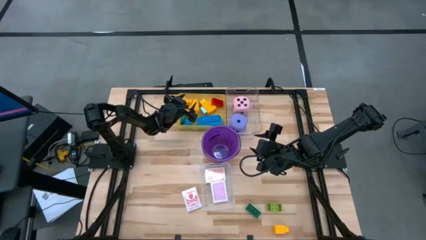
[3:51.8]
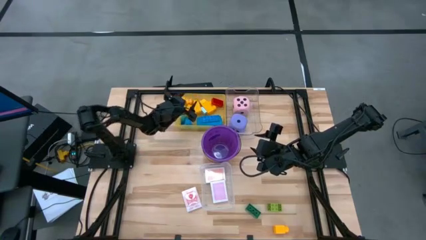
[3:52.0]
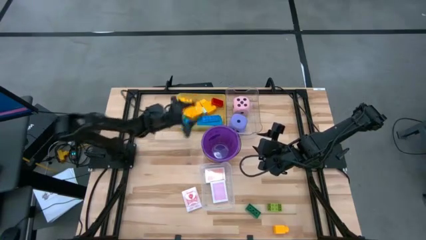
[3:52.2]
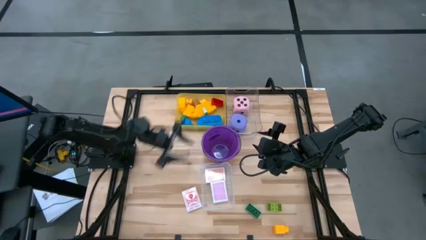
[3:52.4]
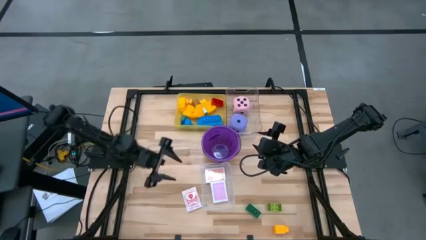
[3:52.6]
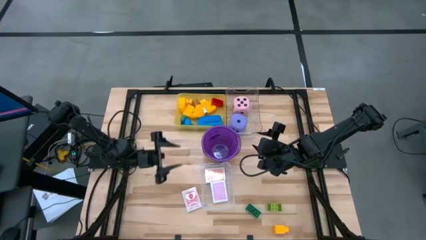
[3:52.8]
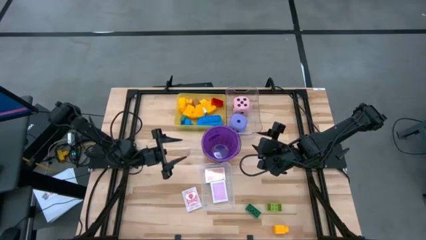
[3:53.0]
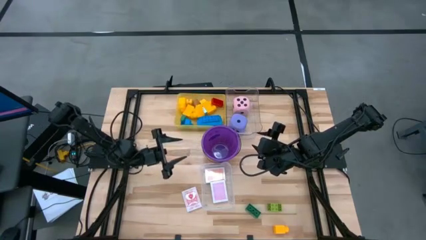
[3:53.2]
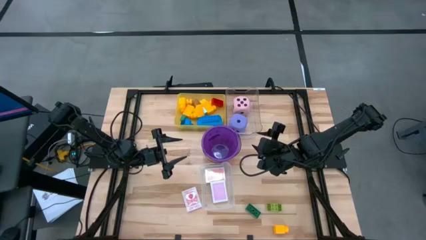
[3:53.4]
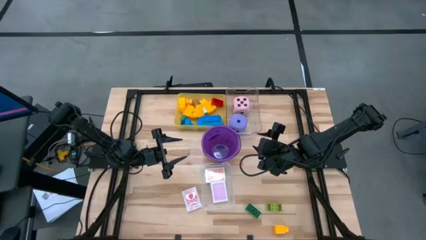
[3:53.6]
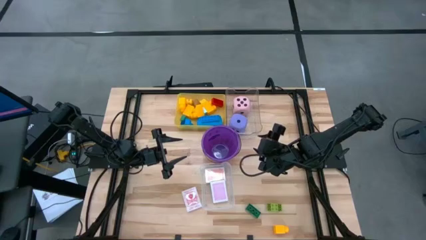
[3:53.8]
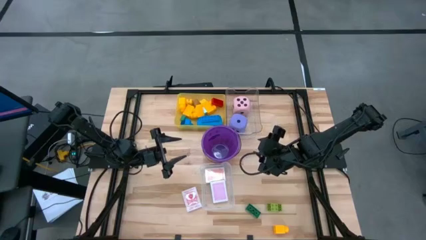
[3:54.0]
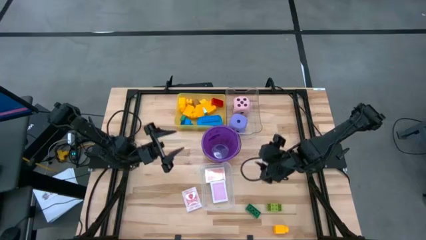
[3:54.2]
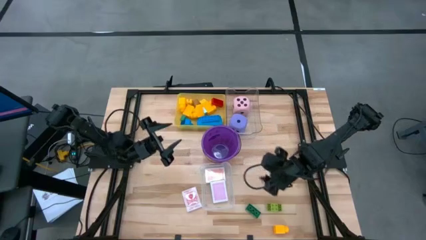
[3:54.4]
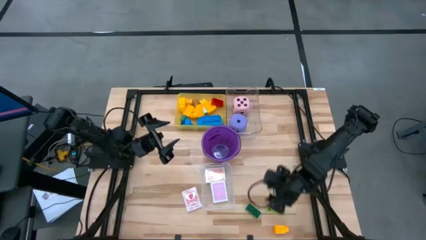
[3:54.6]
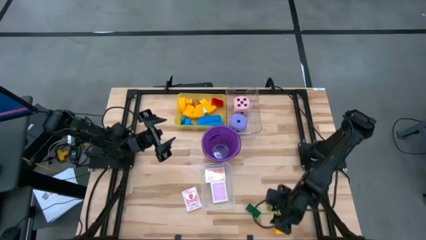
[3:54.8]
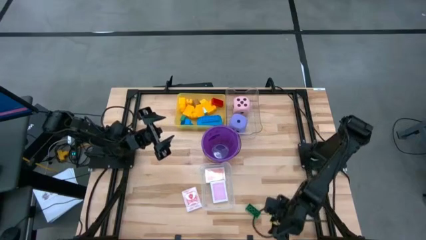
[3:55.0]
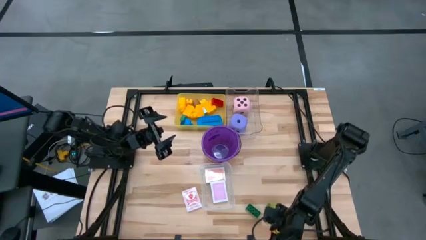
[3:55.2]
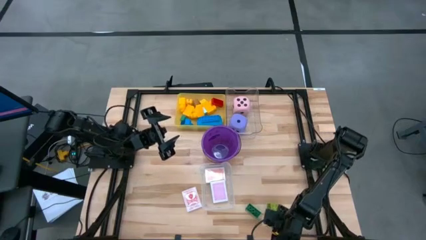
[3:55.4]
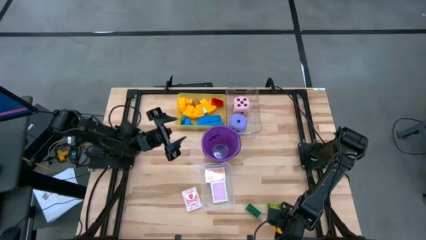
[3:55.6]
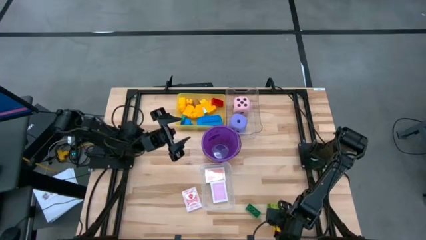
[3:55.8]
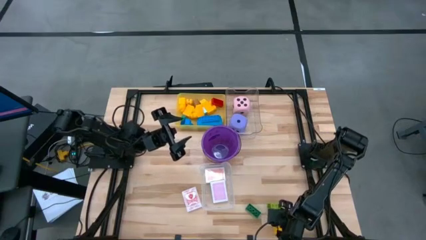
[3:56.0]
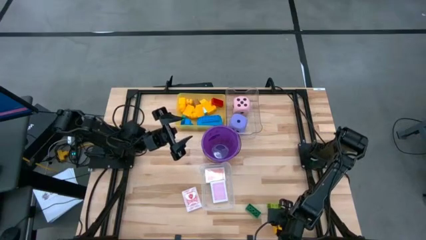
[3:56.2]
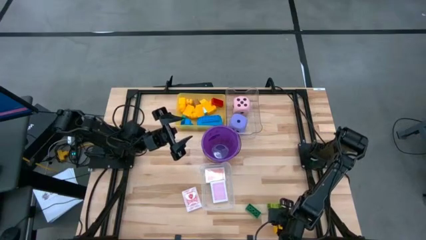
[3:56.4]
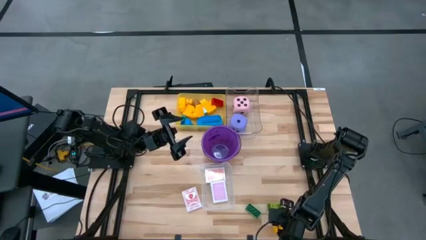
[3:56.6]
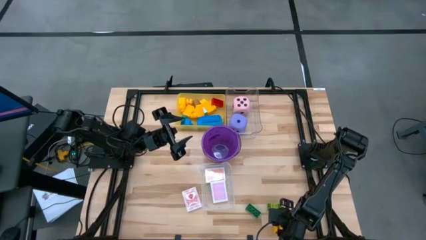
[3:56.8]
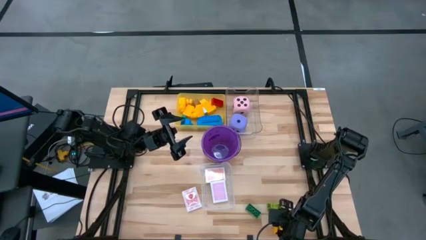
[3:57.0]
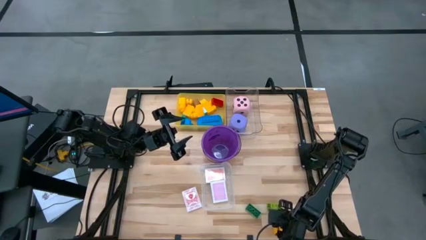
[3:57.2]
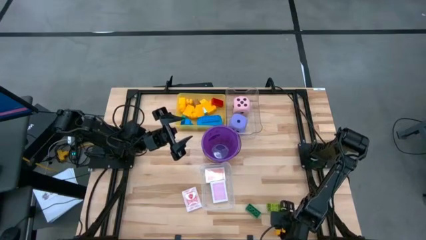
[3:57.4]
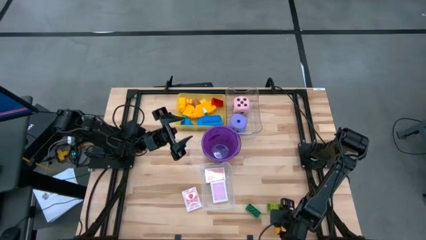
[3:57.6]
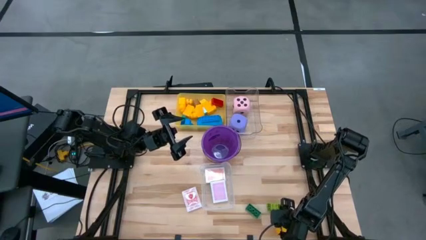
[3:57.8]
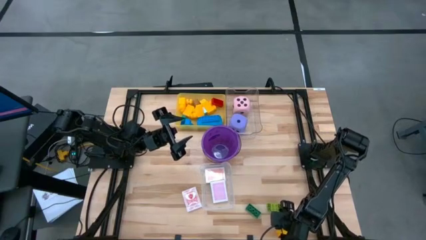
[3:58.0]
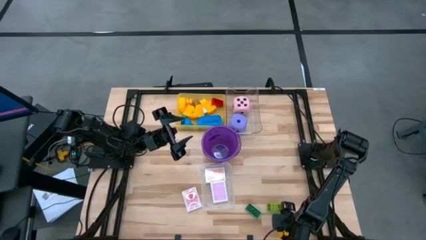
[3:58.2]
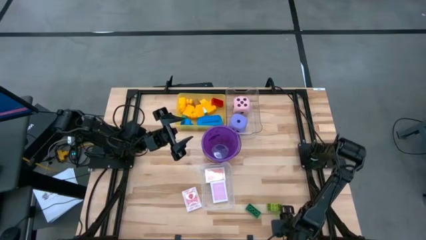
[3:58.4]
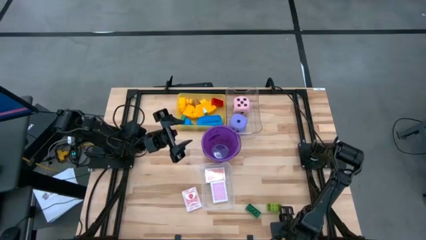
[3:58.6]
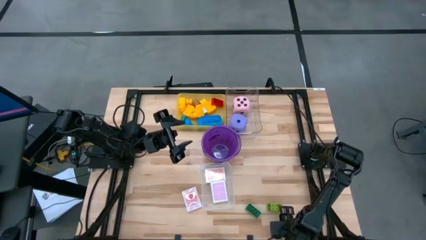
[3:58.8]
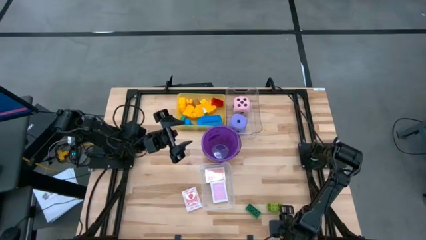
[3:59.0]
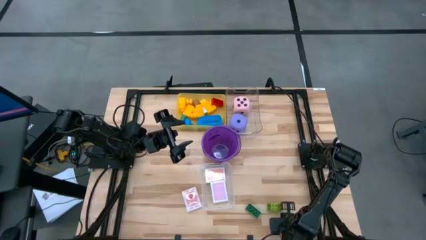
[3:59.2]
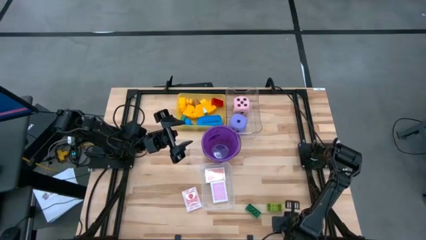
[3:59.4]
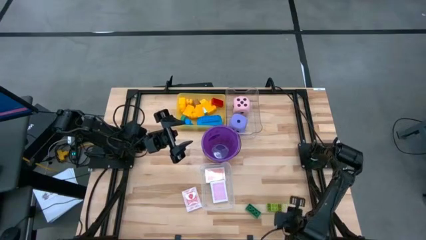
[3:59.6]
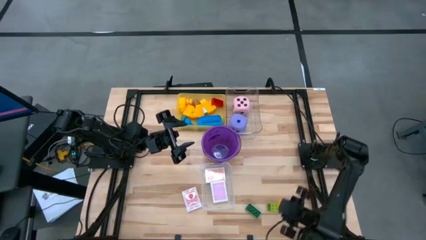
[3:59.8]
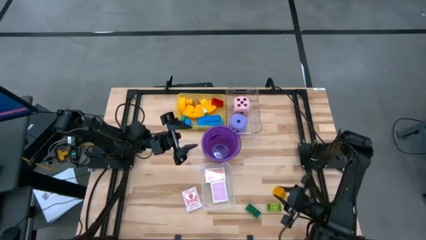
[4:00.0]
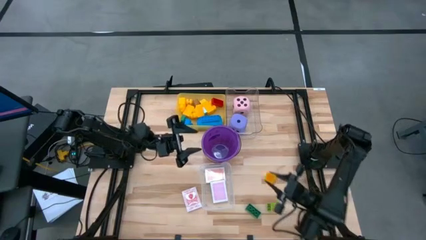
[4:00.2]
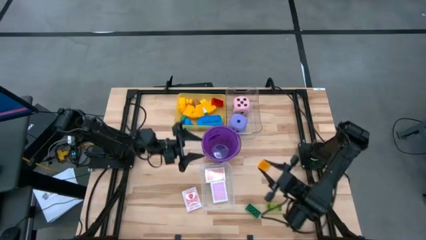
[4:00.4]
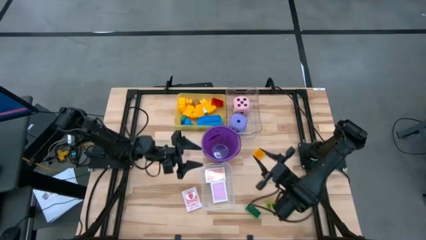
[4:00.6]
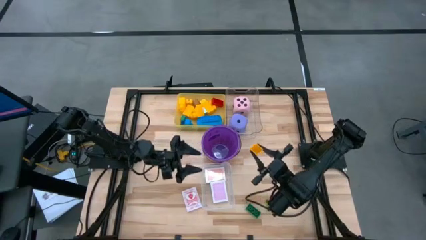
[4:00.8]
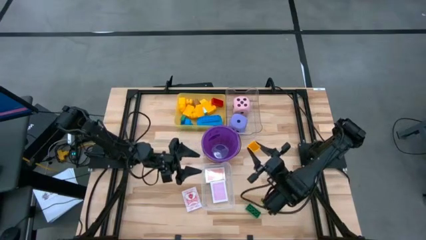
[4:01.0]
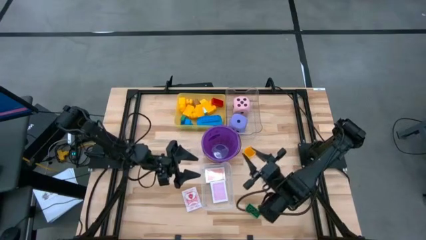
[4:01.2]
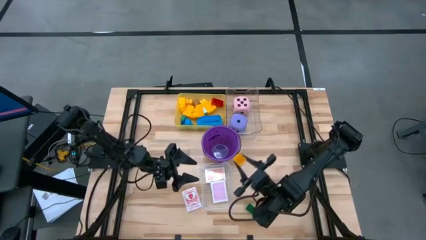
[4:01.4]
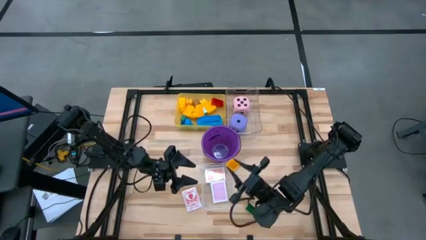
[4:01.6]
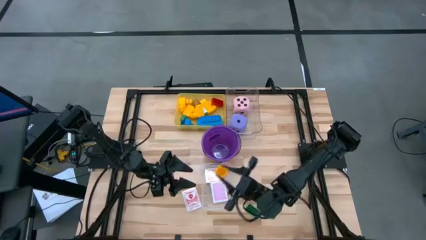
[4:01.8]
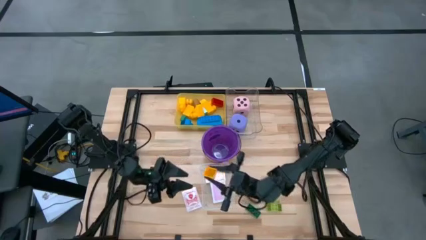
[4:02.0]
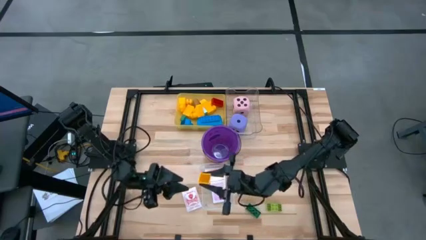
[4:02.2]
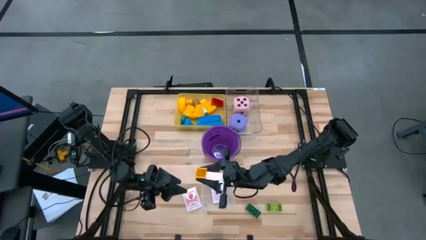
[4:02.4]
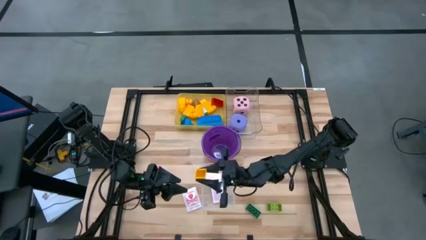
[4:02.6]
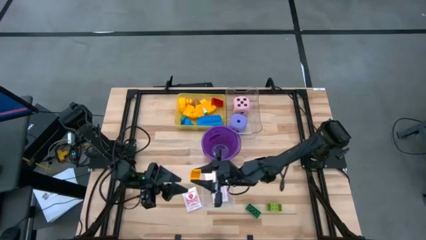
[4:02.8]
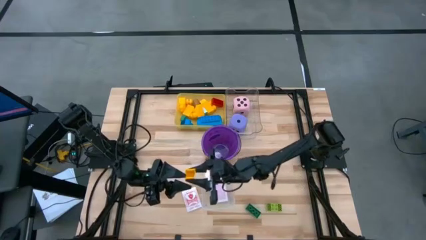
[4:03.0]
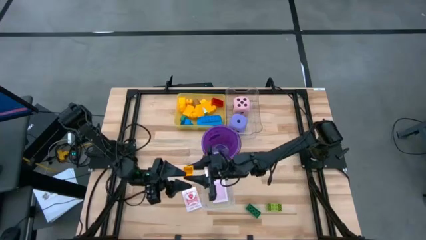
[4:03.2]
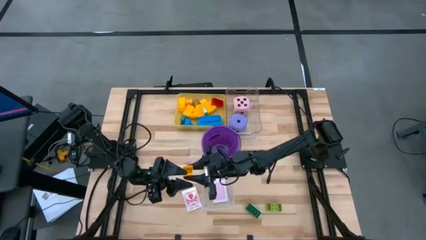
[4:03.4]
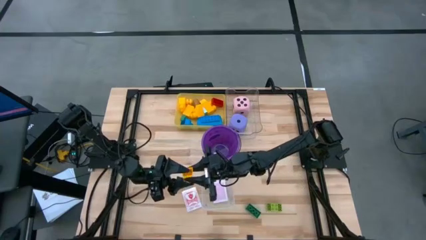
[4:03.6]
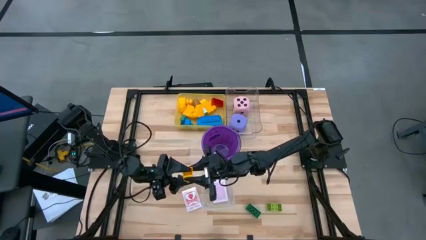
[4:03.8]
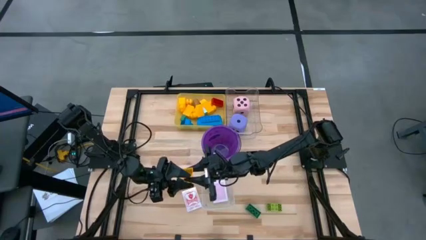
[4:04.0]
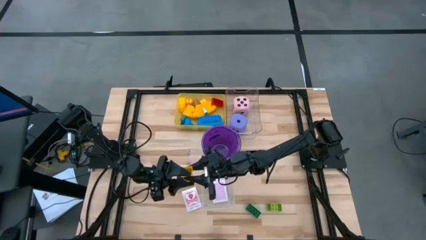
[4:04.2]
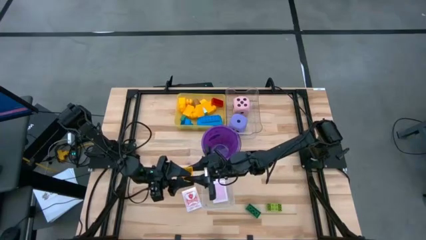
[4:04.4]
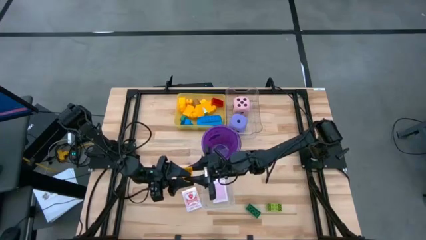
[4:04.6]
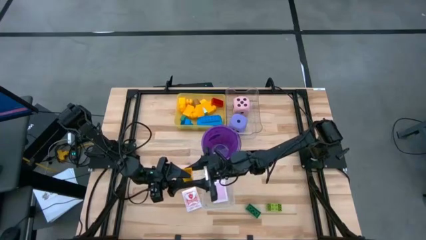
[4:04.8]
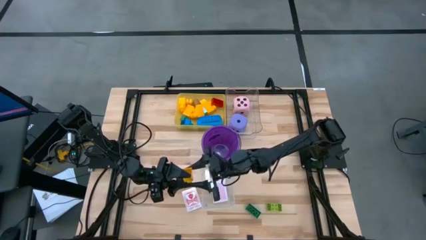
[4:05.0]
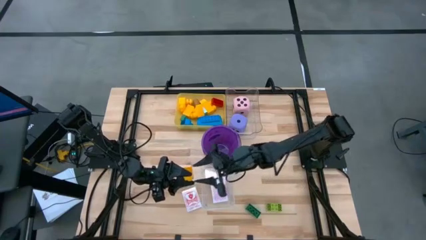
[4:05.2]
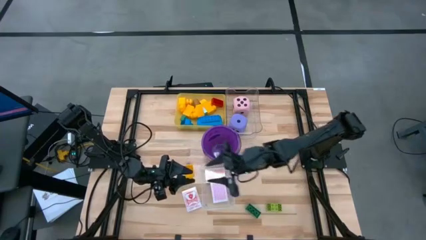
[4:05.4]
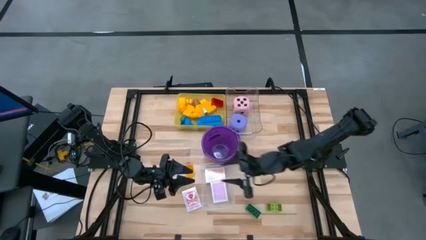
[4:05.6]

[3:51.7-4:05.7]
Task: Pick & Place Toys
Put the yellow game piece into the yellow bin

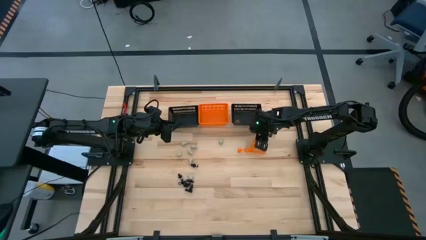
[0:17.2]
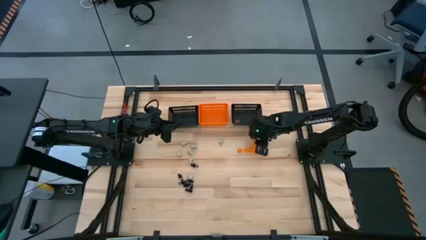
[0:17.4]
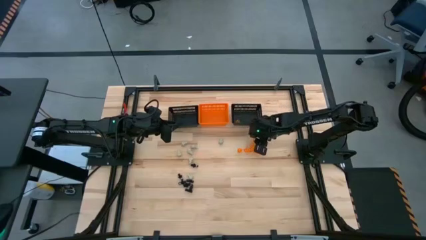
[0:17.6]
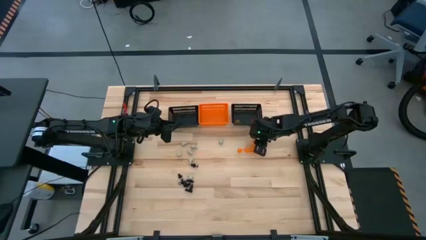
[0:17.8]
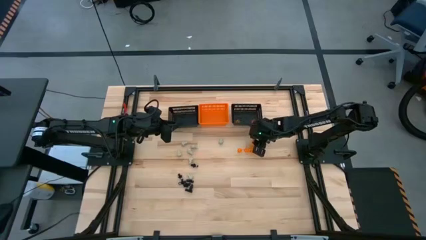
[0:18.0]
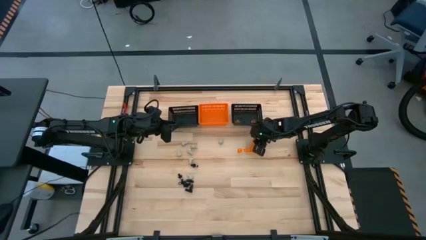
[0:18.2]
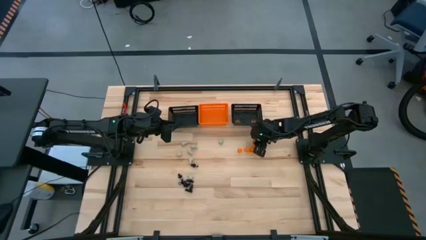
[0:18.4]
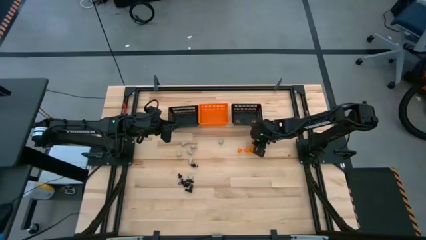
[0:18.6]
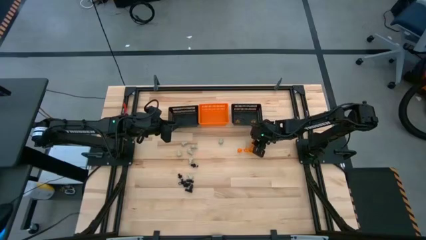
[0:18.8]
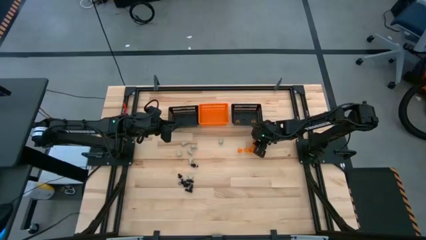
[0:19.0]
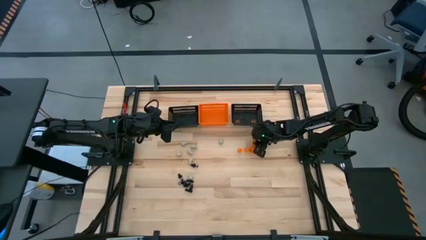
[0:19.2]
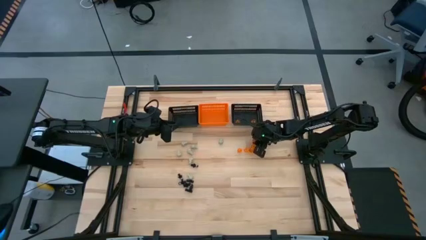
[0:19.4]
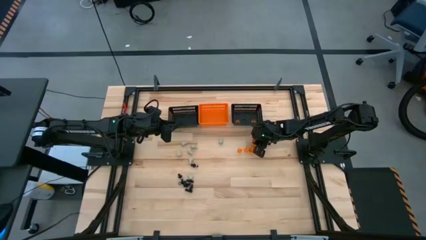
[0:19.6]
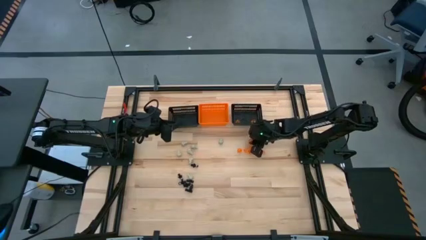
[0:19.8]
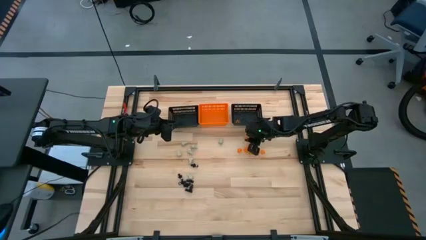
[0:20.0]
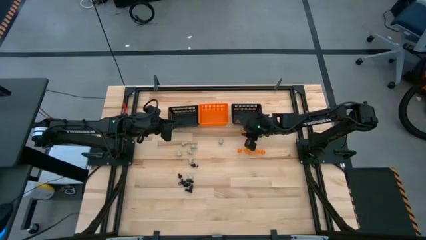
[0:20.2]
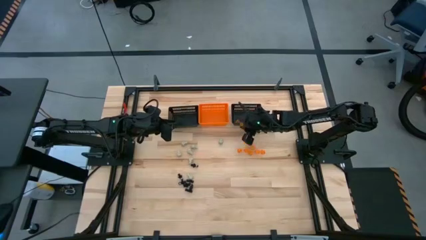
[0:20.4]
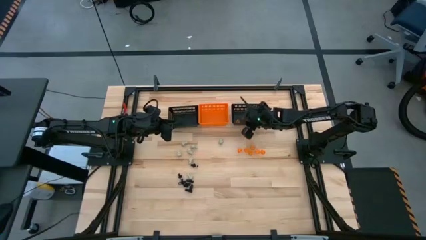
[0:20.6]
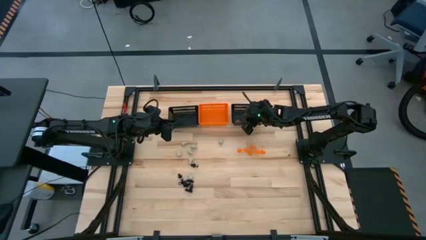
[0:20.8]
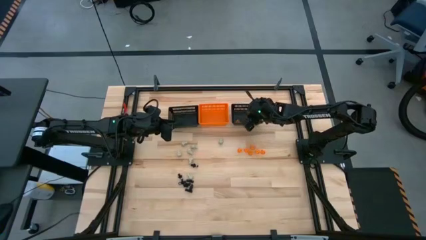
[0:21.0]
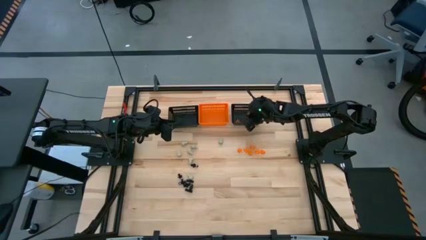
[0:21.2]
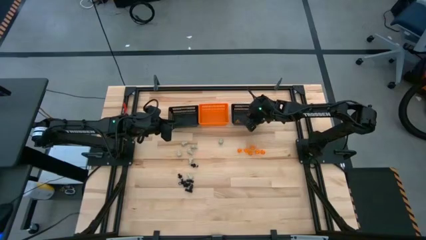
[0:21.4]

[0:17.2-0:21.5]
Task: Sort Halloween decoration
Put the orange pumpkin toy into the right black bin
